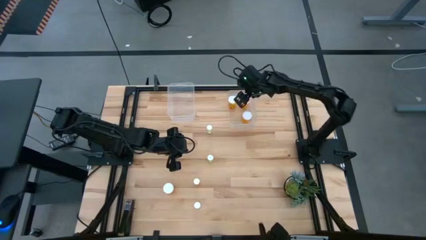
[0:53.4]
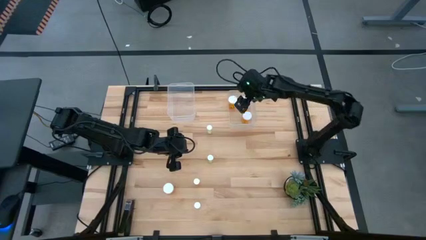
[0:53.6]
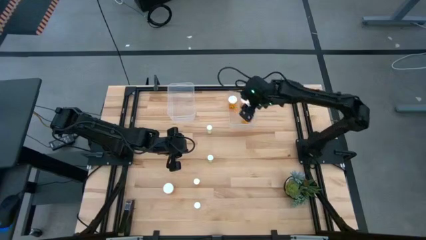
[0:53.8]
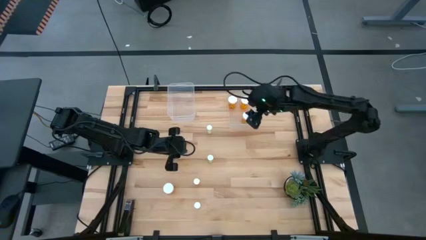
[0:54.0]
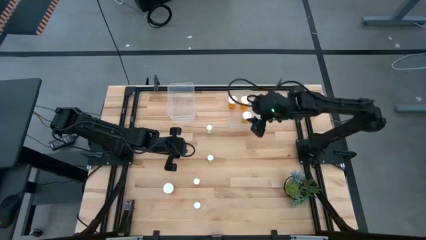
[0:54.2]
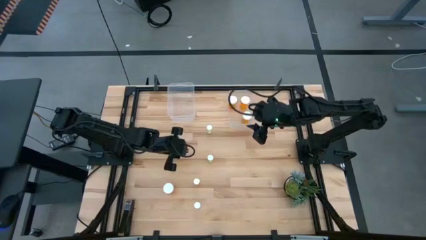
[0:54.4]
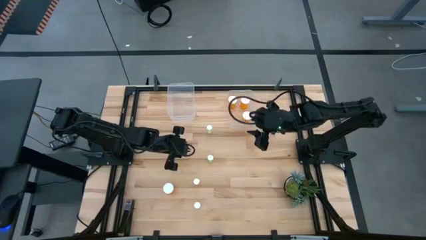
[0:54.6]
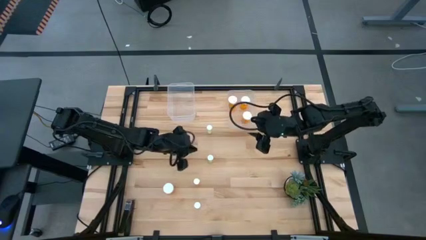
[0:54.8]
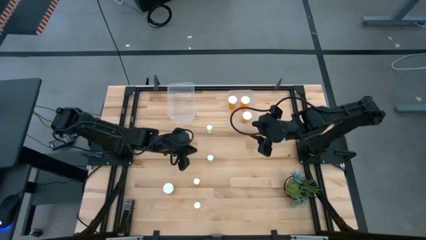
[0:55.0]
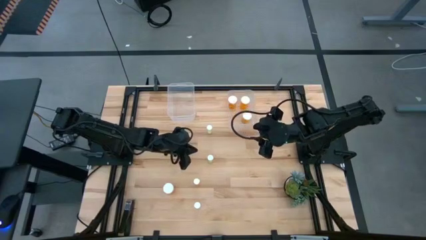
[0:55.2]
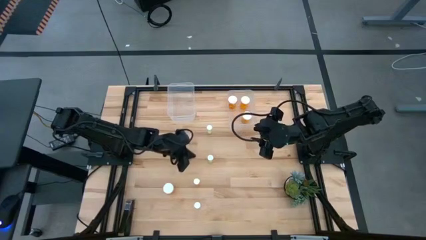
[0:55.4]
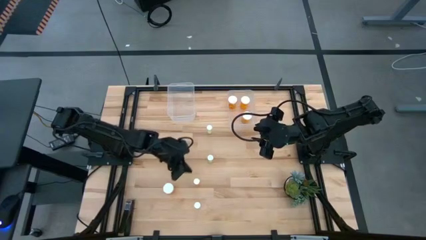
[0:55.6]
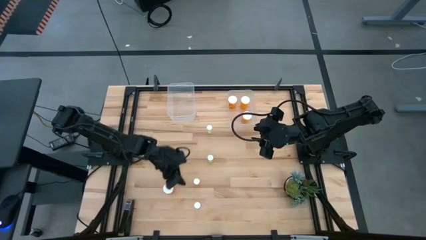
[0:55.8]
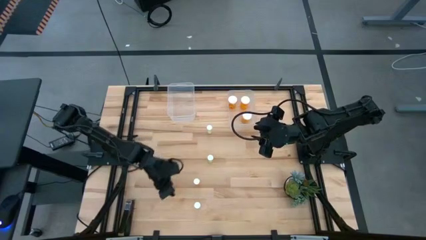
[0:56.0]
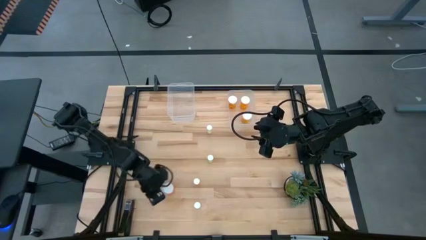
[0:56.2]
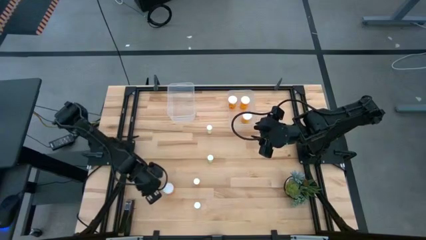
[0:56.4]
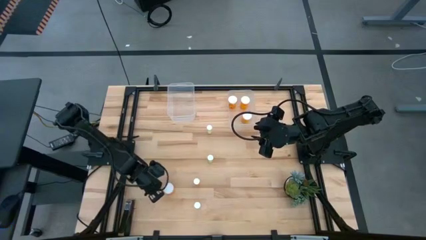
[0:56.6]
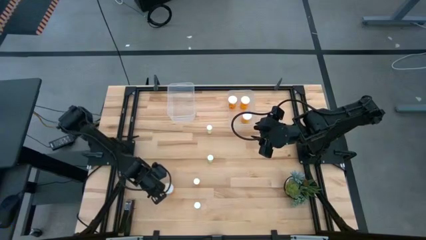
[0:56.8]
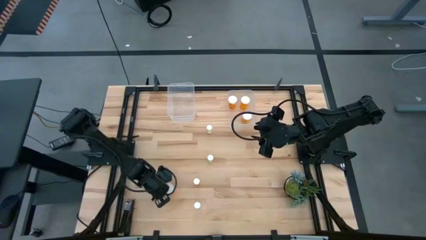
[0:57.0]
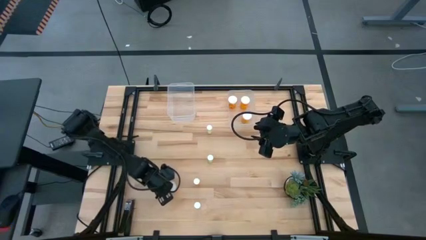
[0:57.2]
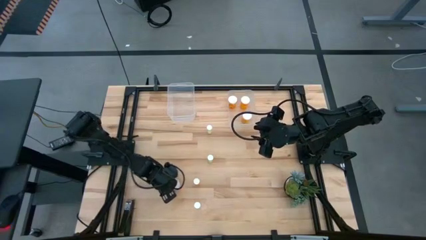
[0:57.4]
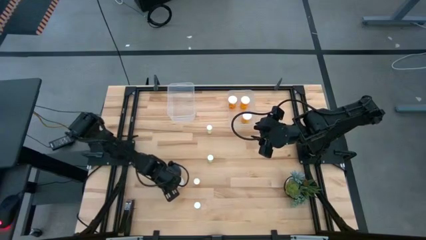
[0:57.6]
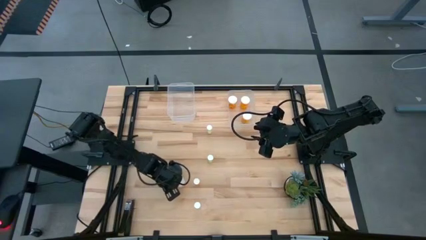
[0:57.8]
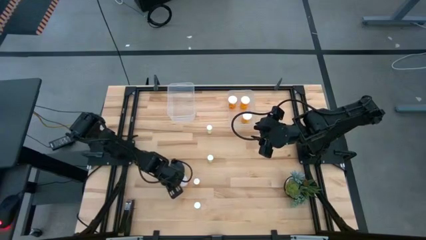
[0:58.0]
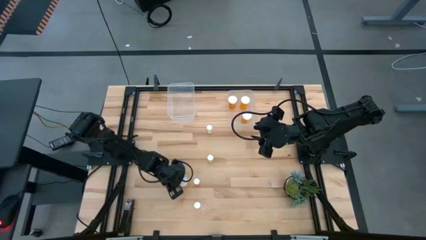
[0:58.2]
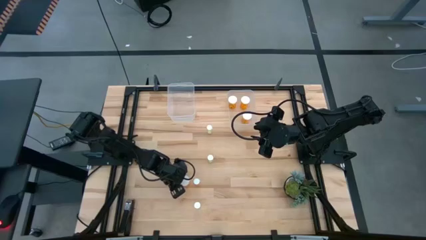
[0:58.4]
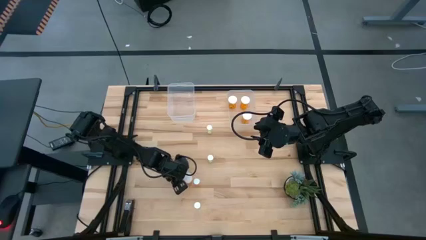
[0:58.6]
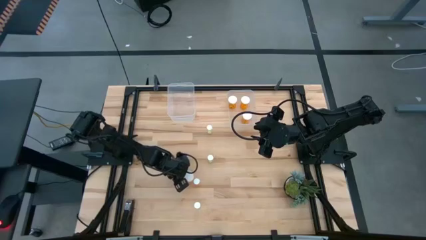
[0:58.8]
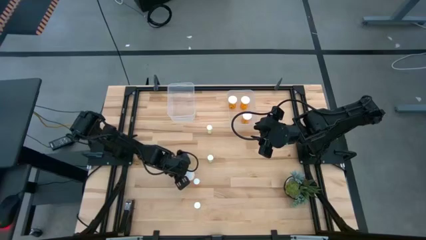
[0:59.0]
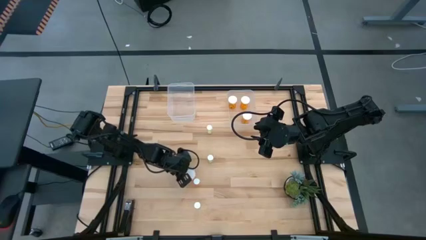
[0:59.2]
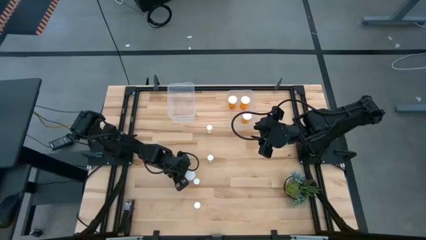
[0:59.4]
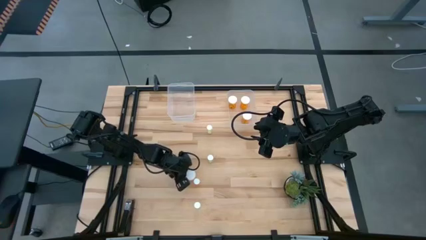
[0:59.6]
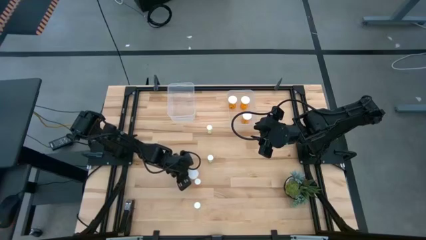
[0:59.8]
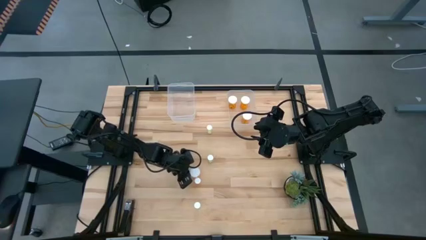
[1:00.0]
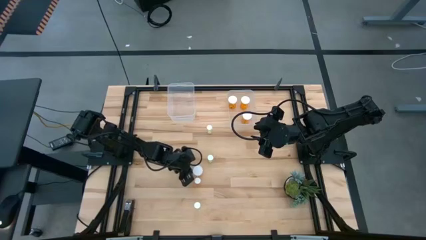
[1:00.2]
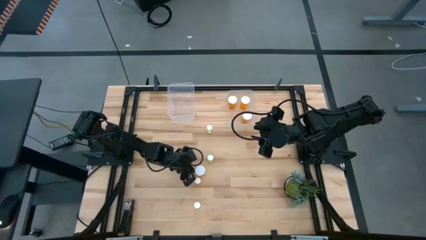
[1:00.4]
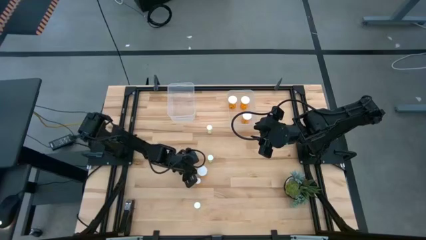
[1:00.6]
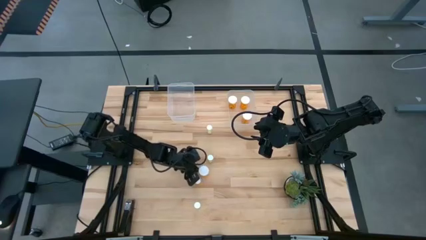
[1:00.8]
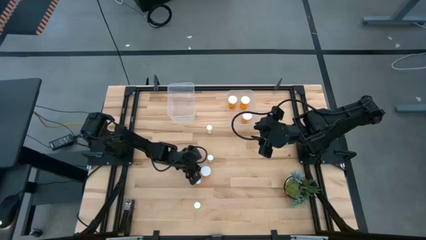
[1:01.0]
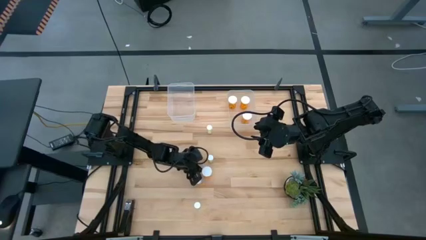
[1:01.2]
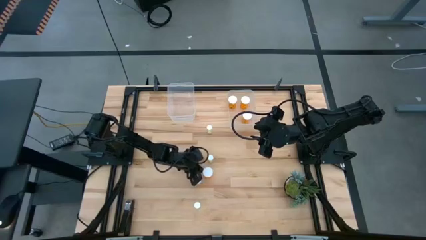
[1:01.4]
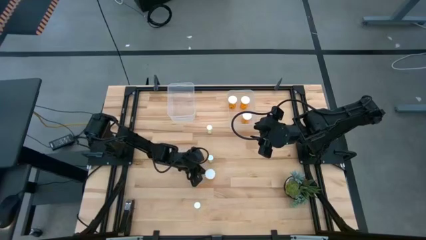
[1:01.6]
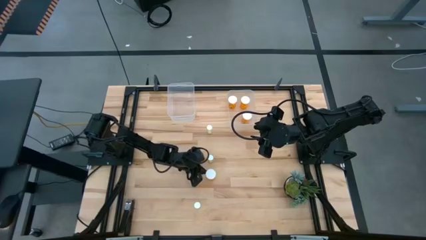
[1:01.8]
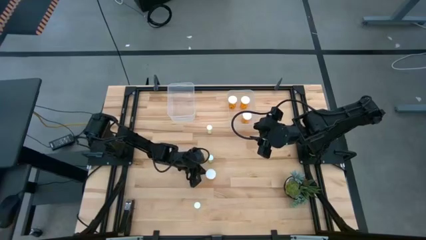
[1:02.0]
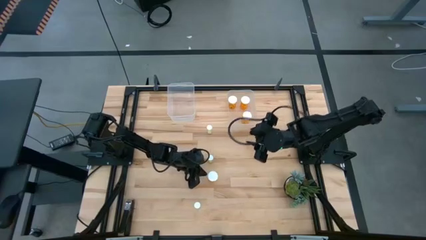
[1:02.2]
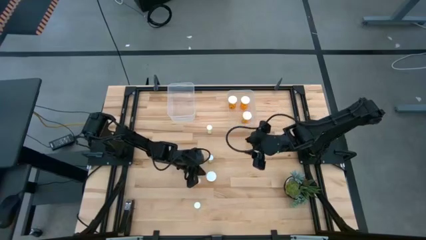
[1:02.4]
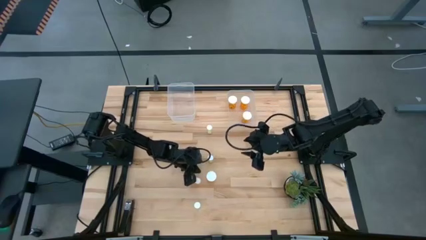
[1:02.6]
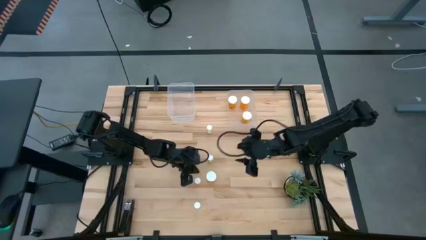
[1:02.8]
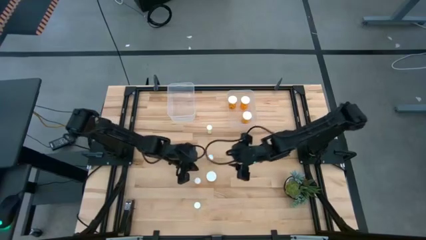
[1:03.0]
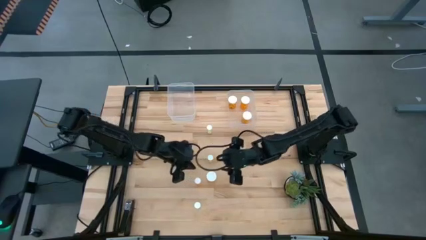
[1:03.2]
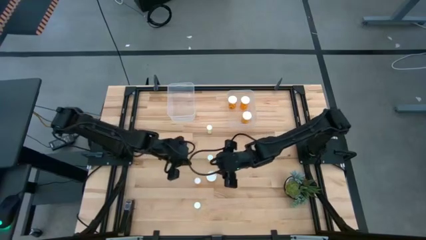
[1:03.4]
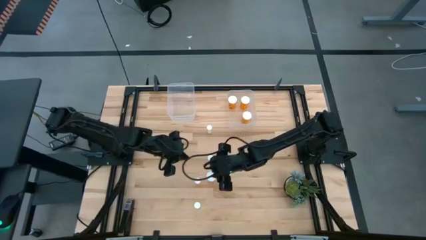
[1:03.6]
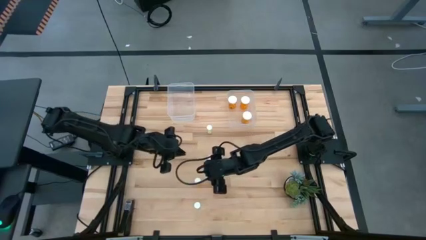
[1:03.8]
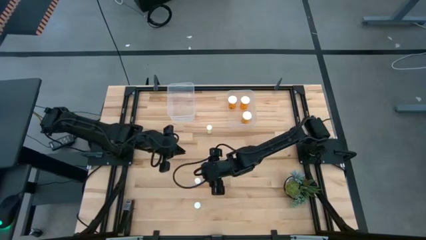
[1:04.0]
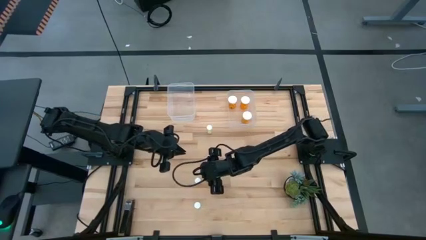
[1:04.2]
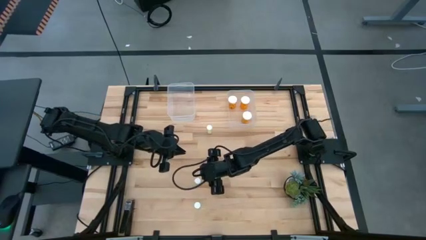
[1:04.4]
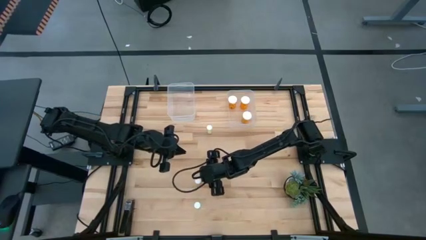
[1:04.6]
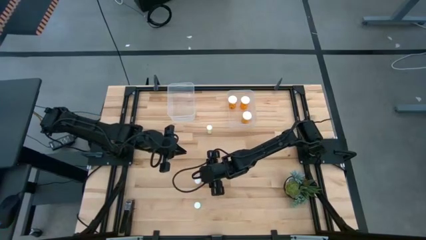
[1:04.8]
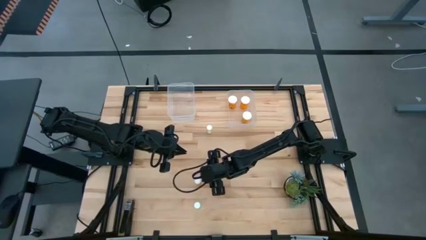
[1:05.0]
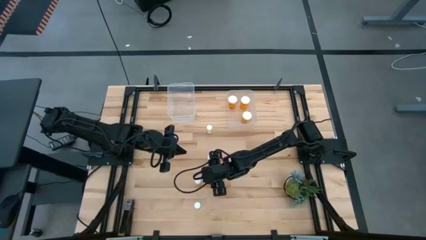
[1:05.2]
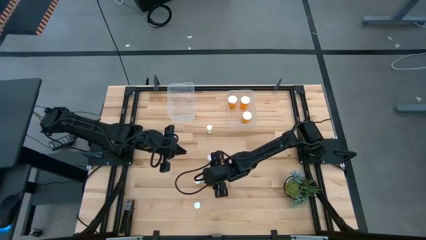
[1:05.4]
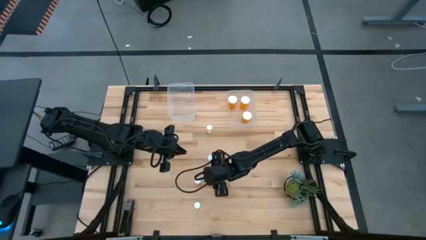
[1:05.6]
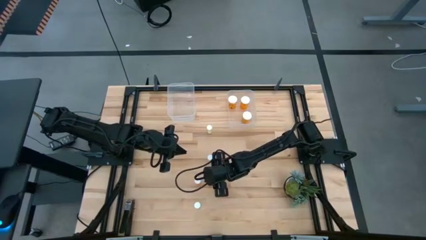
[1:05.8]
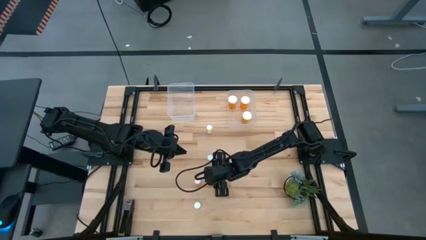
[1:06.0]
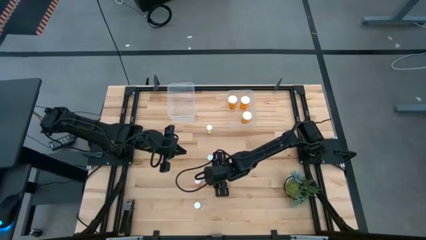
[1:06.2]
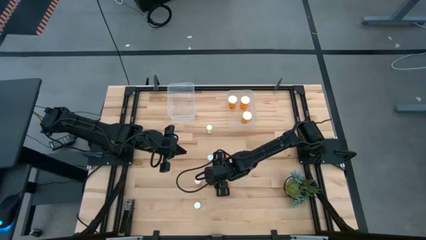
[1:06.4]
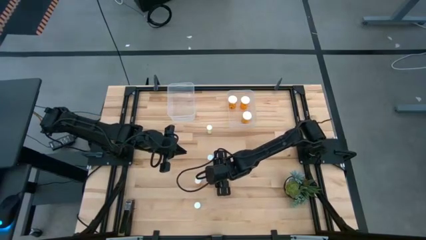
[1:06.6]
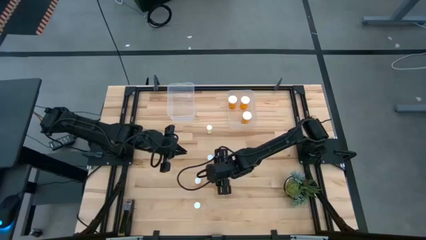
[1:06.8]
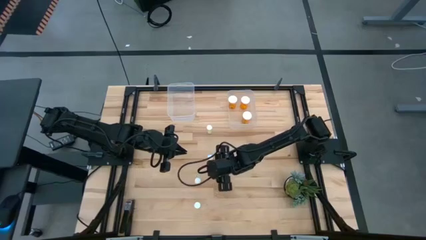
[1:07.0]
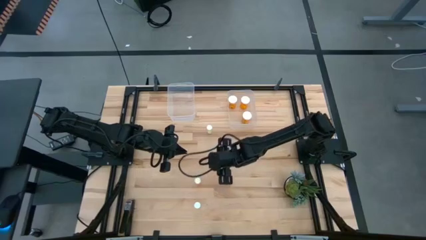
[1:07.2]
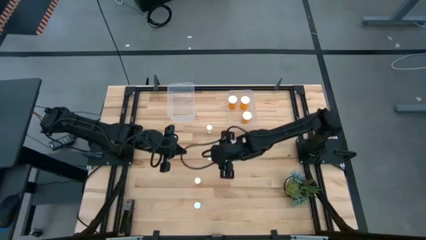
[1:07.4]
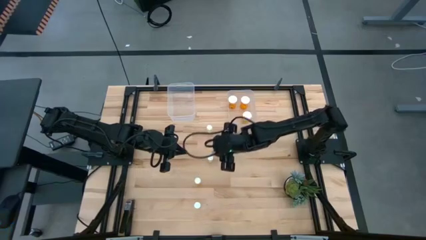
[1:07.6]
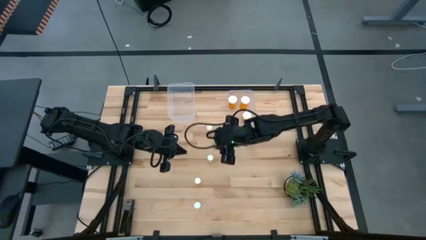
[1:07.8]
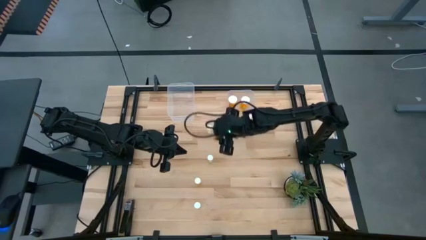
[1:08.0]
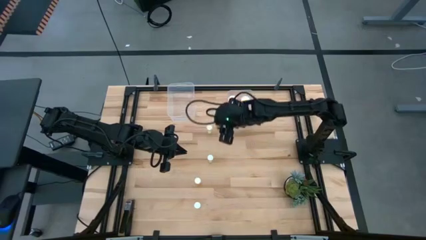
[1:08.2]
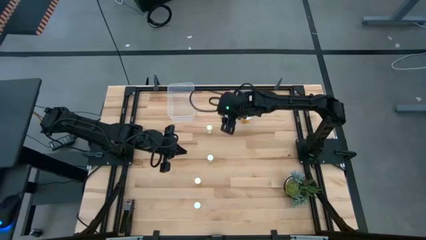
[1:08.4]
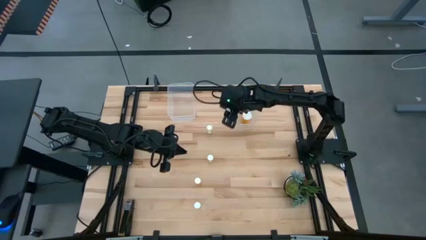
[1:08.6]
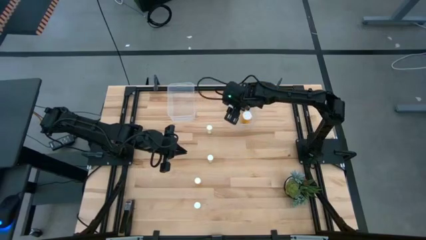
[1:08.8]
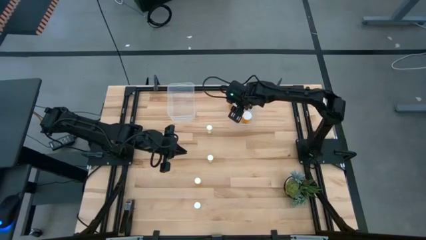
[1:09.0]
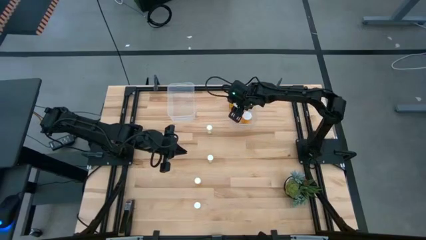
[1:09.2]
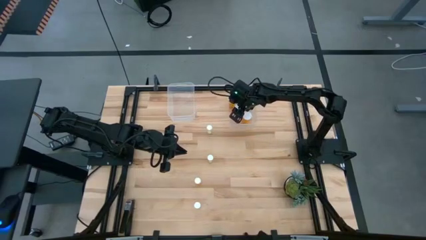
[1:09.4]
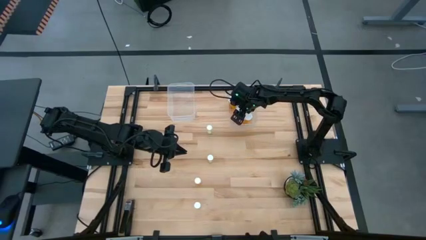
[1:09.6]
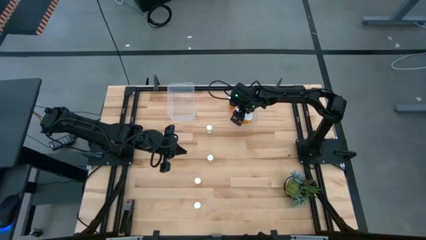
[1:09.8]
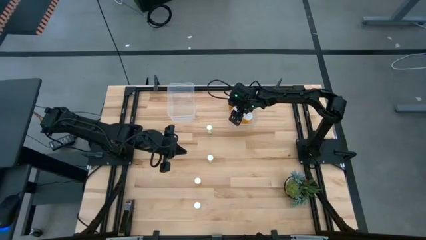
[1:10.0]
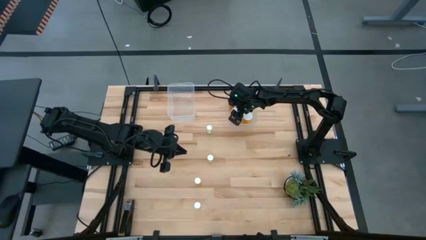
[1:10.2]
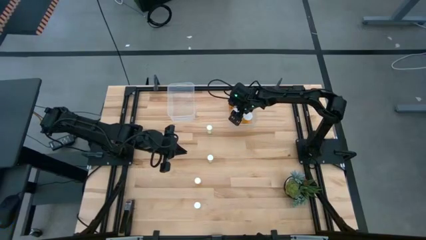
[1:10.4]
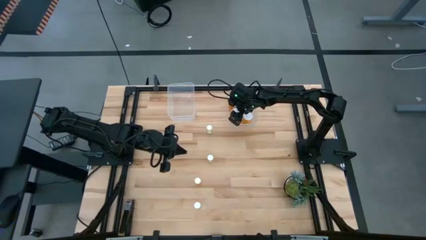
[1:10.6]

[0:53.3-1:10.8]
Task: Pick and place medicine bottles into bin by pill shape (circle, oval)
Put the large orange pill bottle into the right transparent bin
